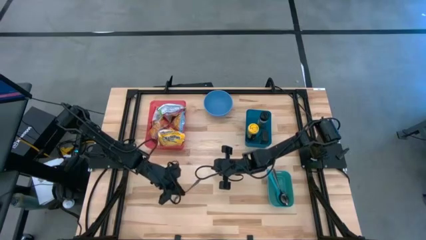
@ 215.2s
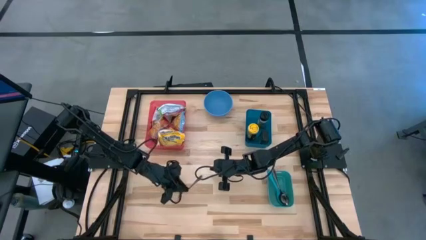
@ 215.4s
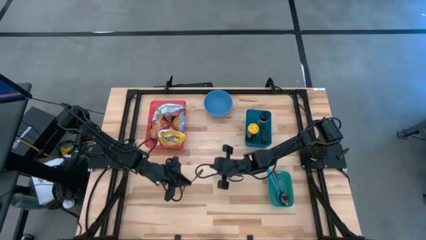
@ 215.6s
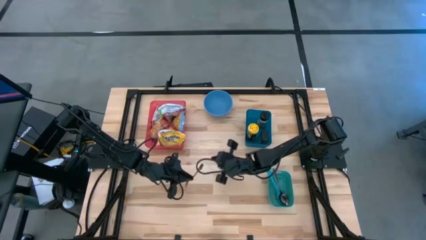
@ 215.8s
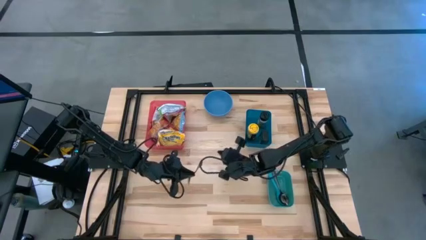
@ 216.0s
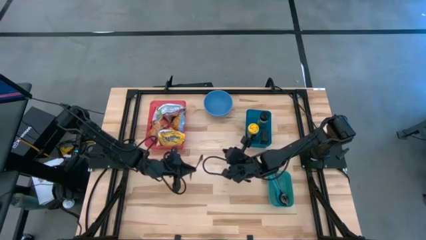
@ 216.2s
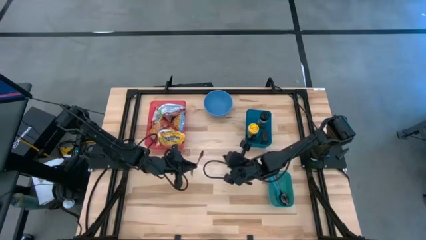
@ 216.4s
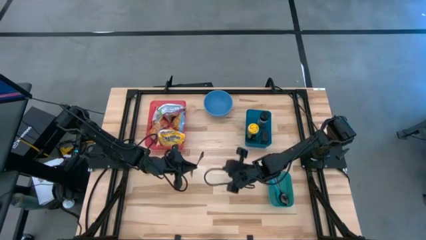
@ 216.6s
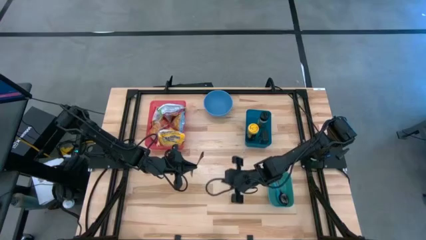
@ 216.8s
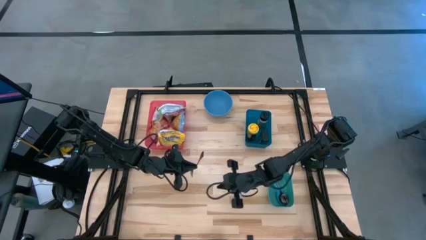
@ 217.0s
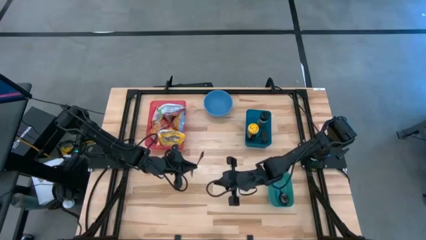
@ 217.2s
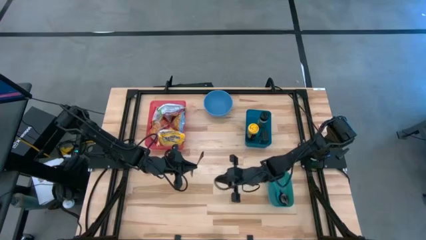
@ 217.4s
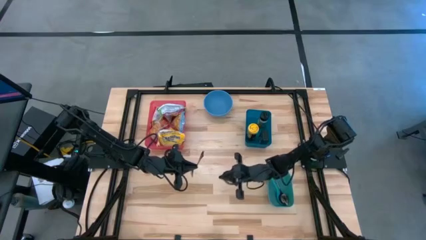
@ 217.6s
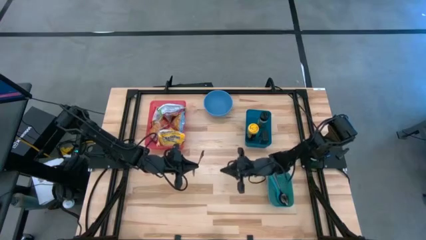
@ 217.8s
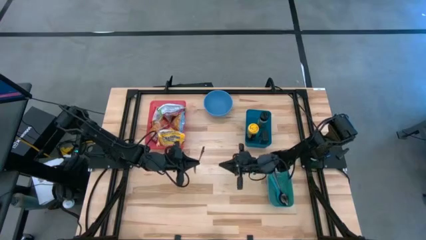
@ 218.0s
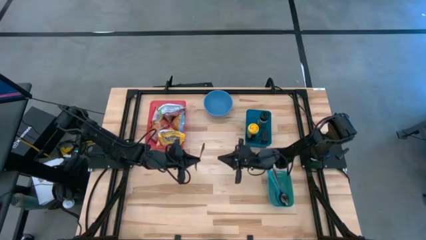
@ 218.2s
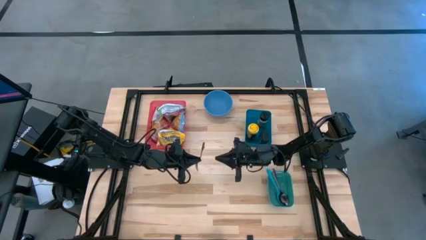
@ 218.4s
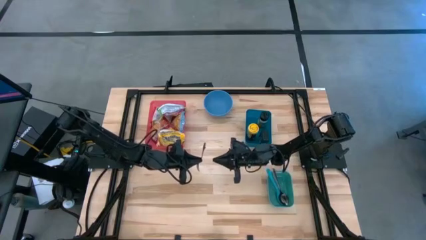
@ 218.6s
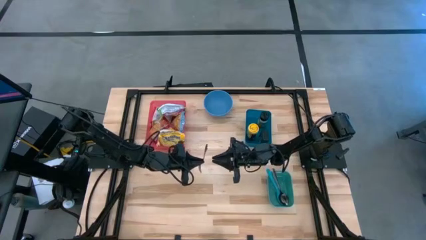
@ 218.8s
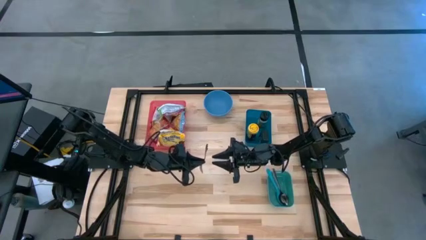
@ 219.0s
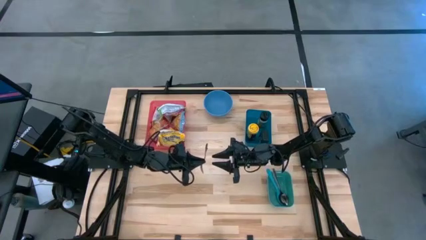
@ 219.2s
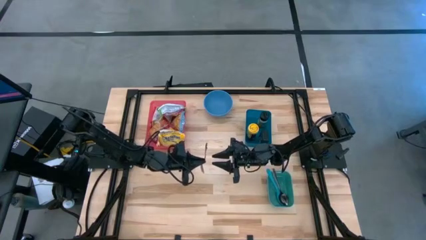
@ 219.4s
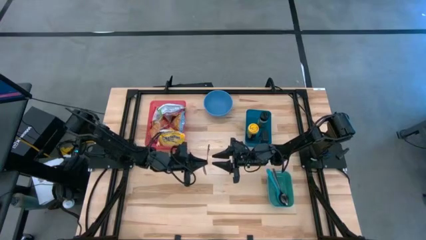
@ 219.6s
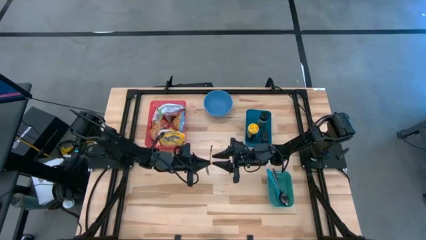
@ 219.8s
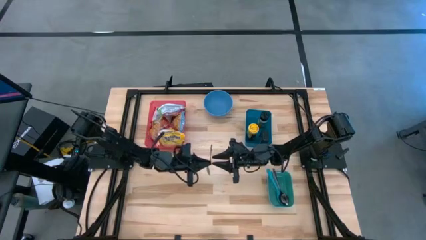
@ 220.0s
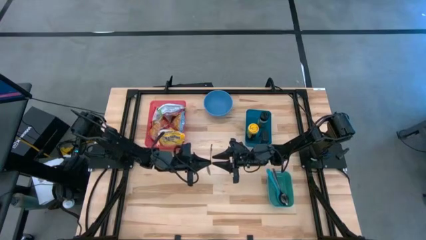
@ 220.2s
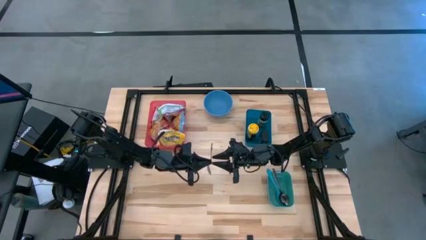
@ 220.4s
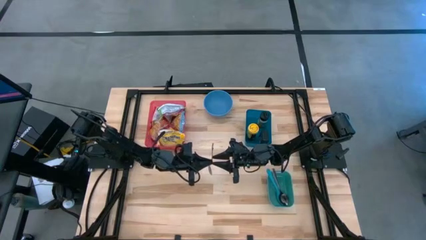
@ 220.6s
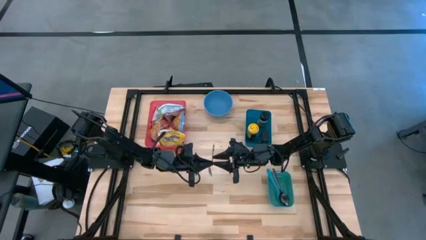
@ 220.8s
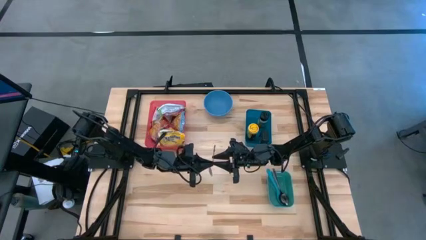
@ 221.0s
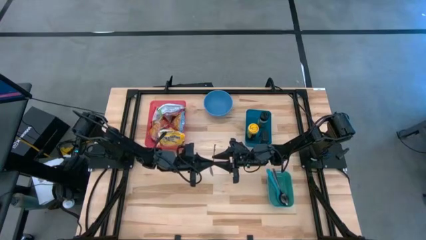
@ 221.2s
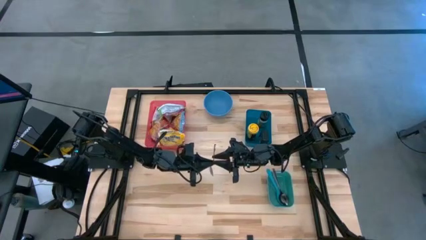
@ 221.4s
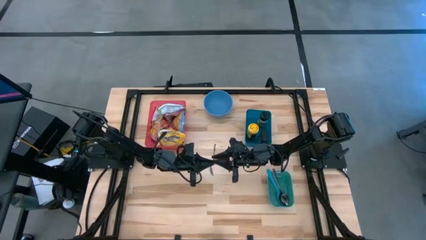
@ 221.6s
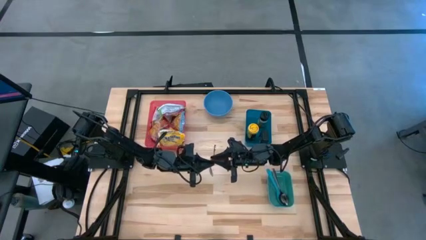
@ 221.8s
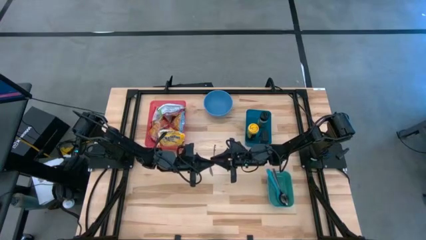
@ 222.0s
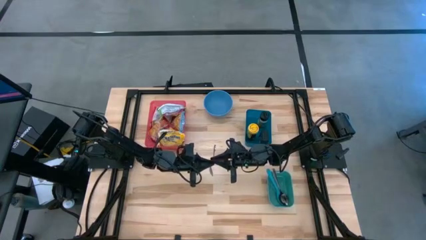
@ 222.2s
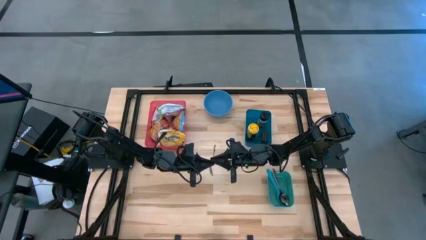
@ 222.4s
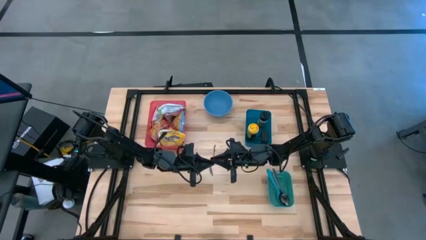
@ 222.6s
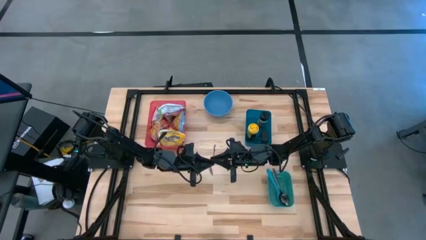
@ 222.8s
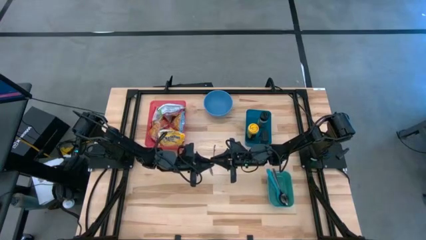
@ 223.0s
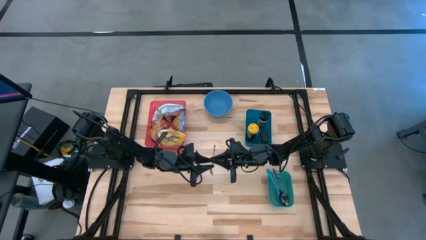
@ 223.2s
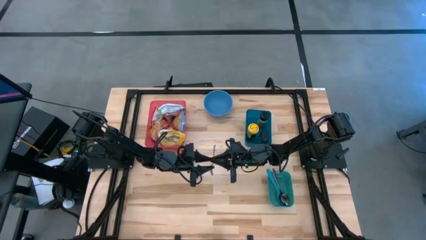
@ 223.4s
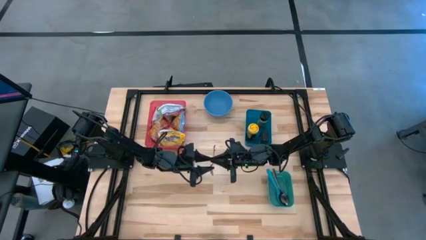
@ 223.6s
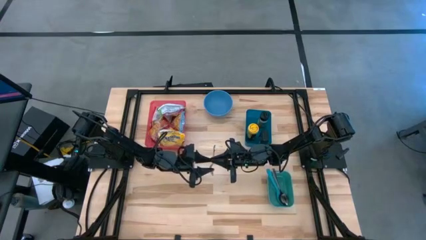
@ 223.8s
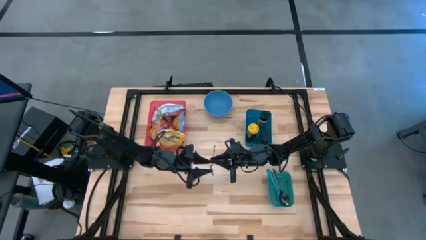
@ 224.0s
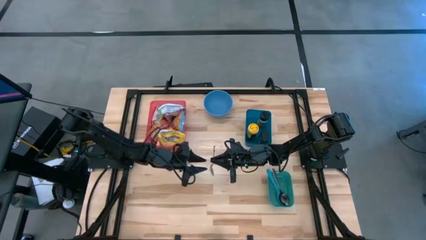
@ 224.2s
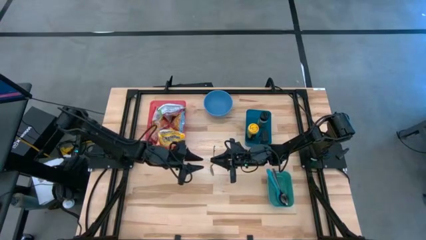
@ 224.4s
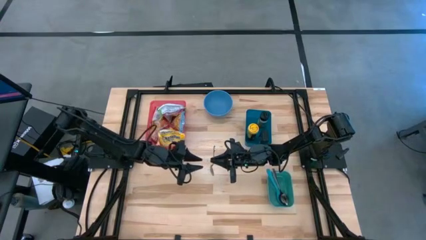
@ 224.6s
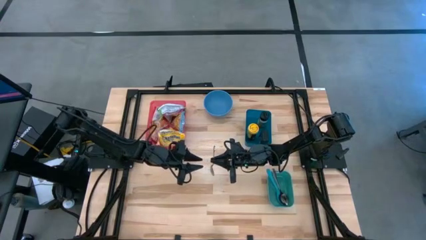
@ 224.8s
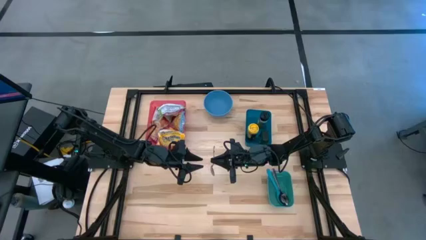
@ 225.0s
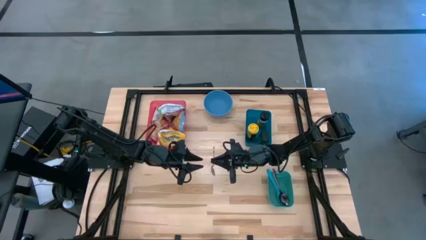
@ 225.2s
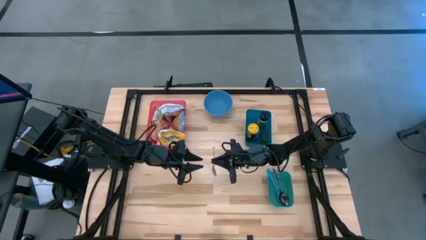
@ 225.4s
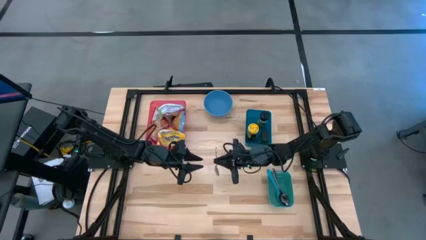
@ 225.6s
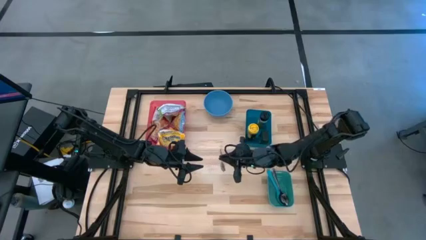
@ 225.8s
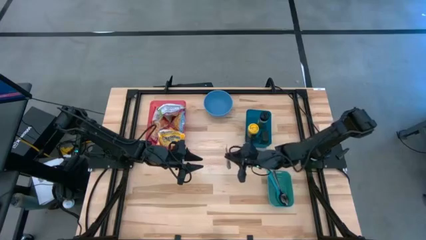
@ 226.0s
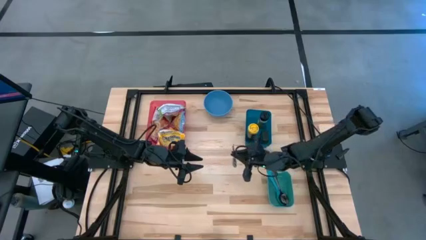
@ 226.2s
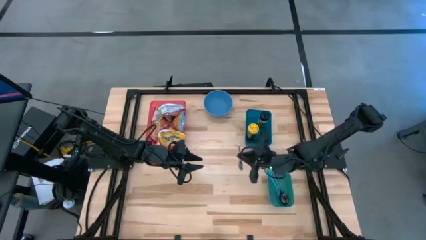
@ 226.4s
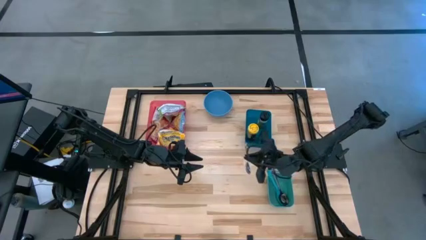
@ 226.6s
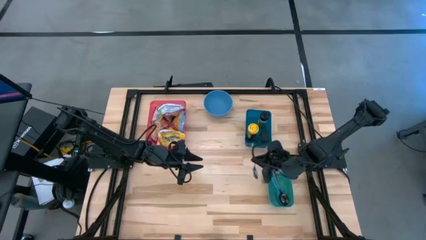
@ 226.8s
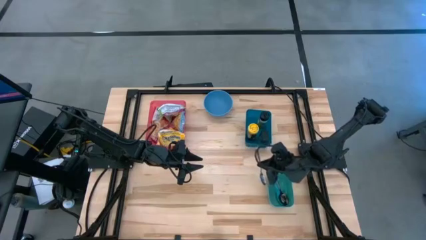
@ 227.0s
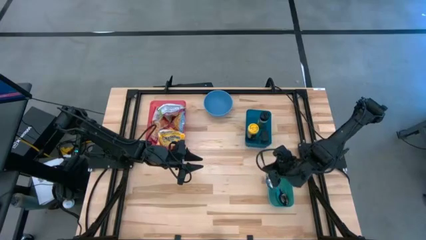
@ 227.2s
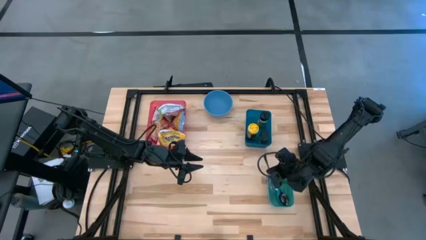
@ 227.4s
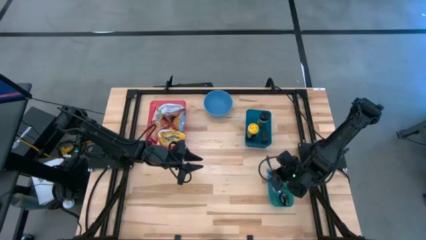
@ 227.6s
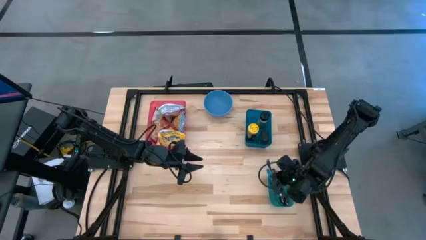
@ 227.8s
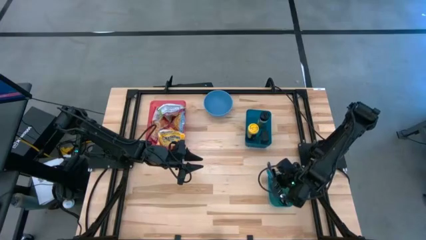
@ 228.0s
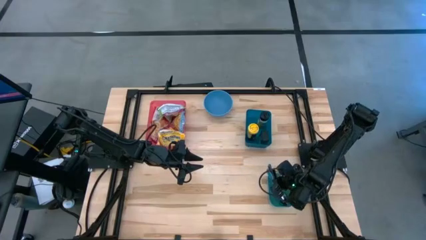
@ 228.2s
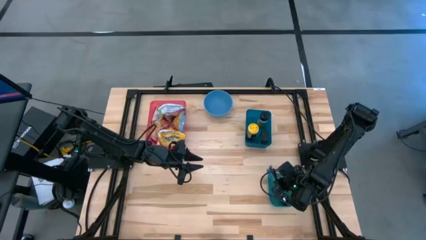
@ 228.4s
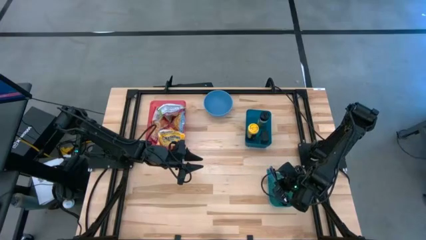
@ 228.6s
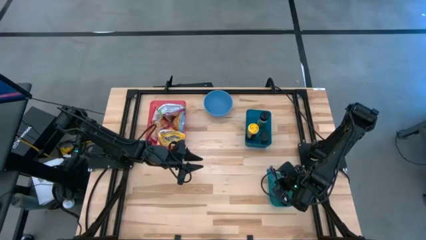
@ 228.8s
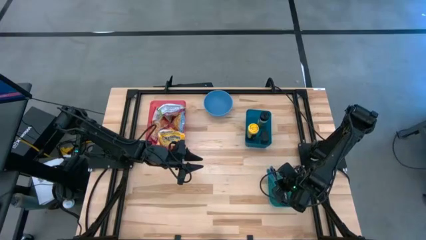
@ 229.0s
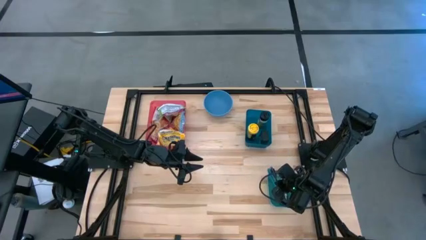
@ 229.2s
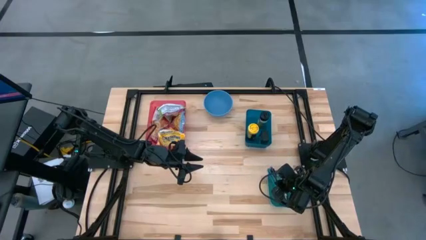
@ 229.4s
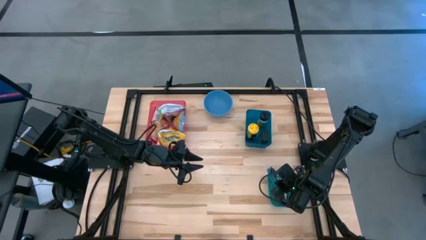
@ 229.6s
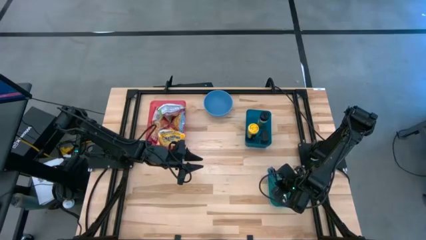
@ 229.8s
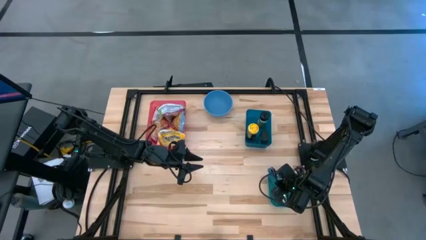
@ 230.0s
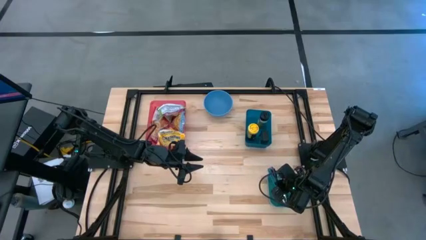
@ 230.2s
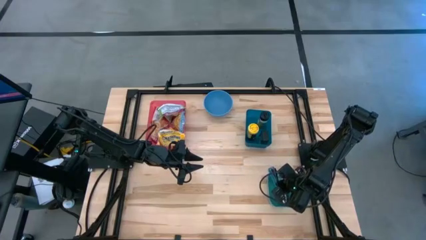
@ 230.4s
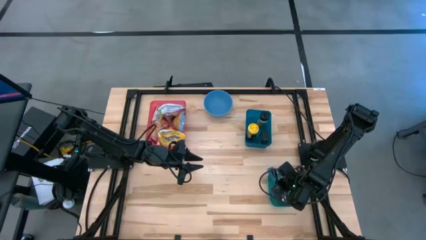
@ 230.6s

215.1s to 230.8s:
Task: Pick & Place Food Item
Put the silver spoon into the green bin
